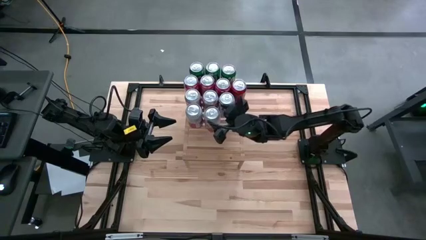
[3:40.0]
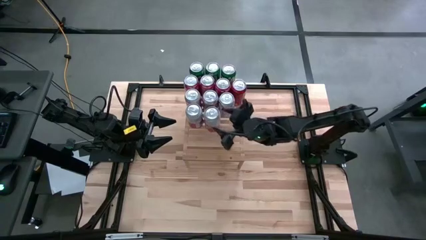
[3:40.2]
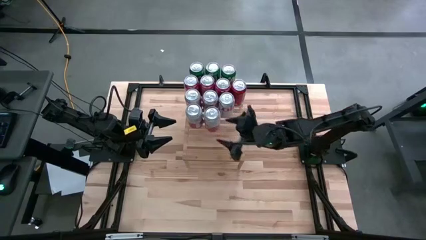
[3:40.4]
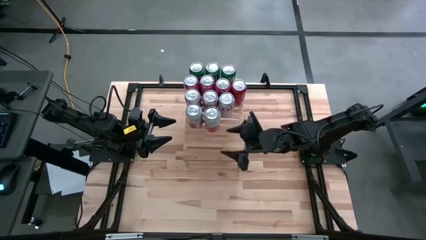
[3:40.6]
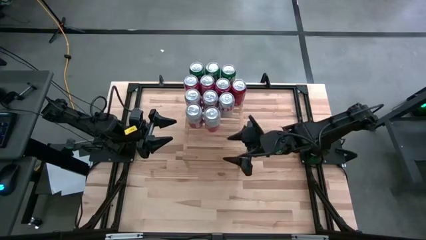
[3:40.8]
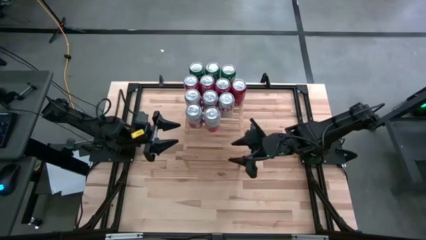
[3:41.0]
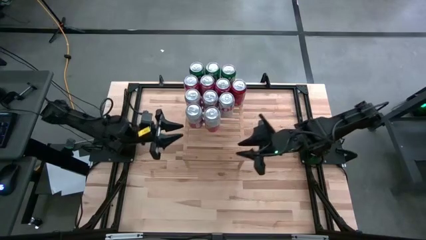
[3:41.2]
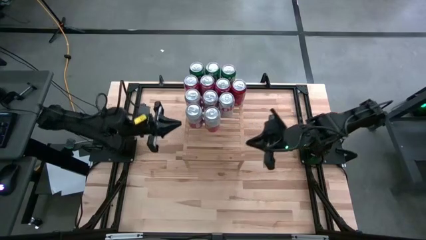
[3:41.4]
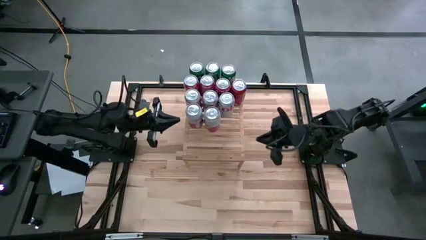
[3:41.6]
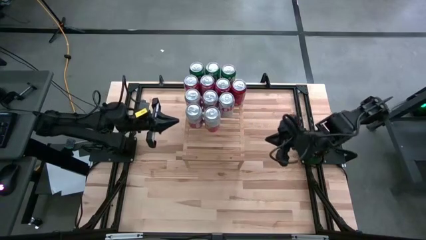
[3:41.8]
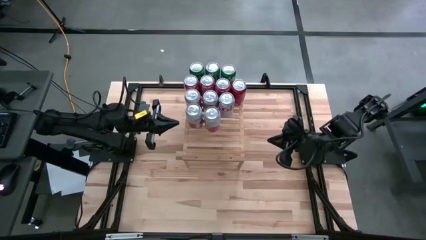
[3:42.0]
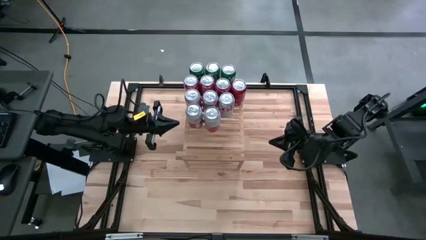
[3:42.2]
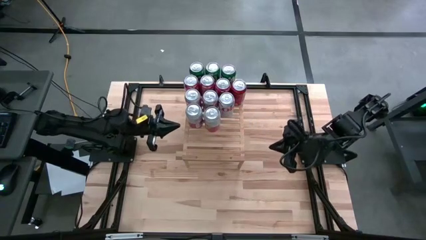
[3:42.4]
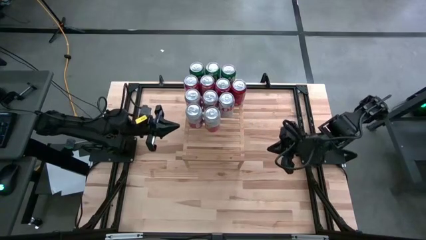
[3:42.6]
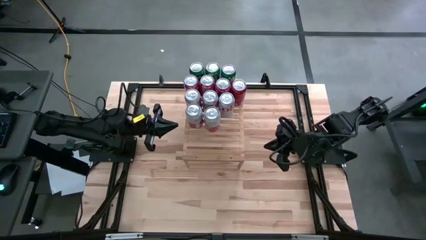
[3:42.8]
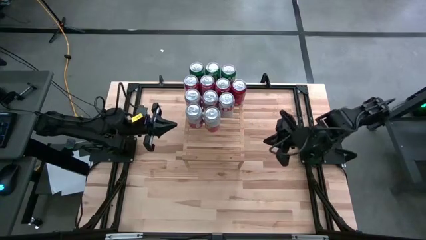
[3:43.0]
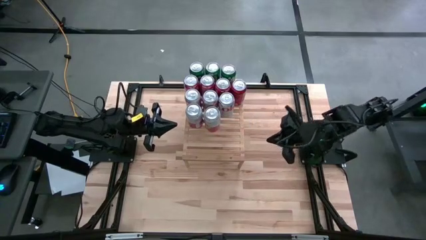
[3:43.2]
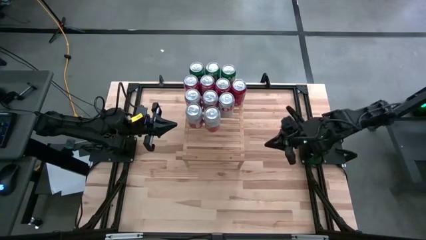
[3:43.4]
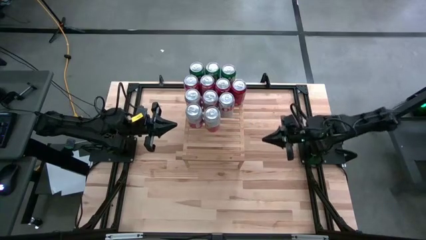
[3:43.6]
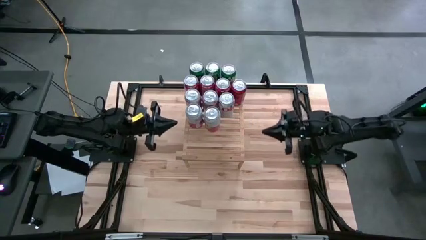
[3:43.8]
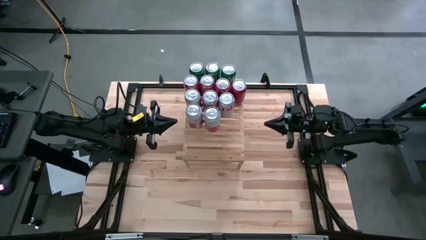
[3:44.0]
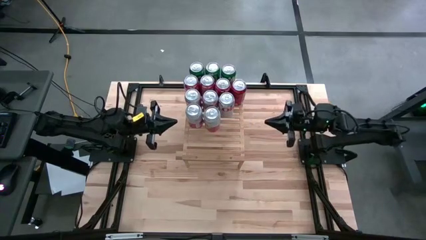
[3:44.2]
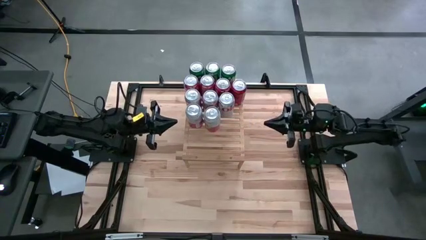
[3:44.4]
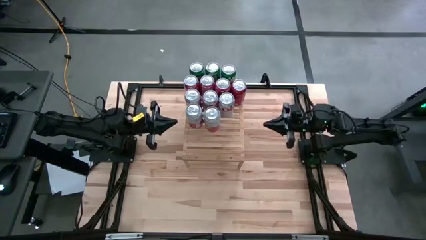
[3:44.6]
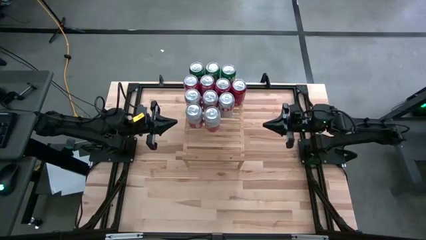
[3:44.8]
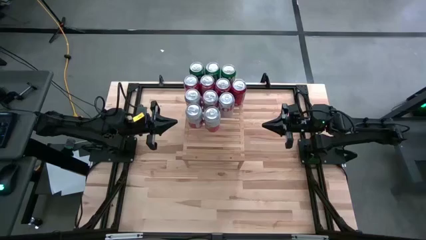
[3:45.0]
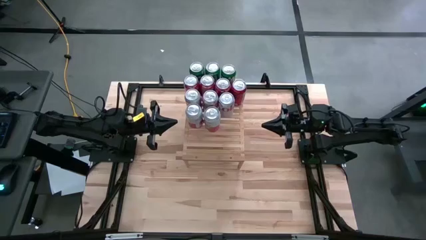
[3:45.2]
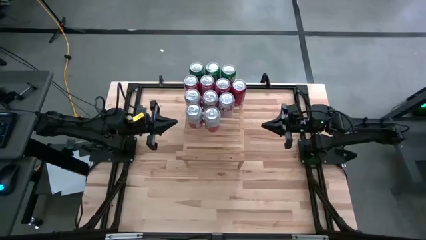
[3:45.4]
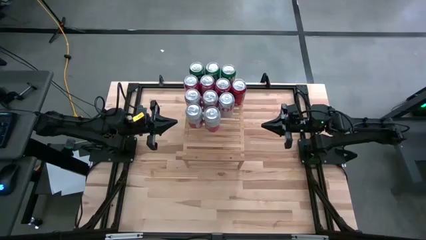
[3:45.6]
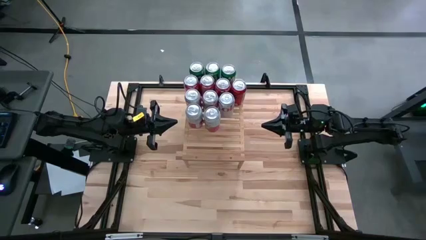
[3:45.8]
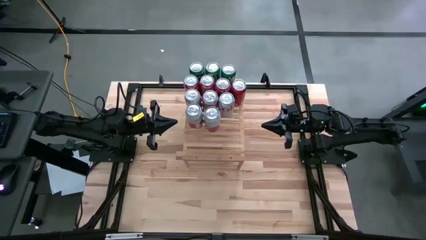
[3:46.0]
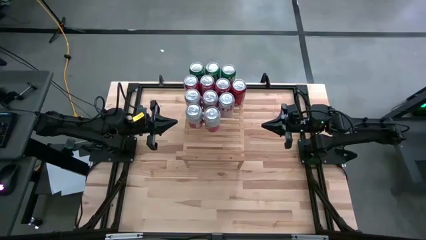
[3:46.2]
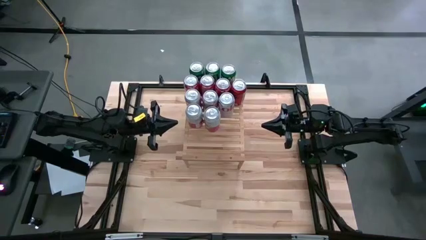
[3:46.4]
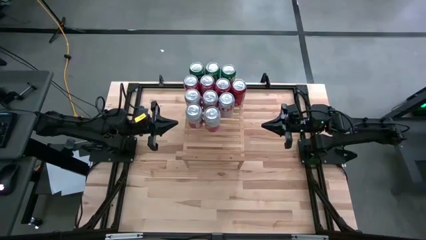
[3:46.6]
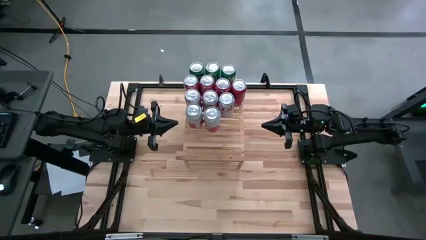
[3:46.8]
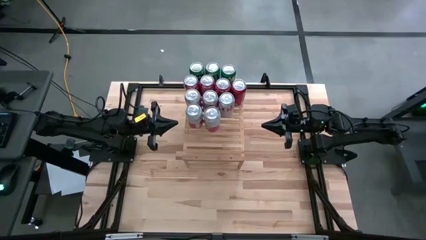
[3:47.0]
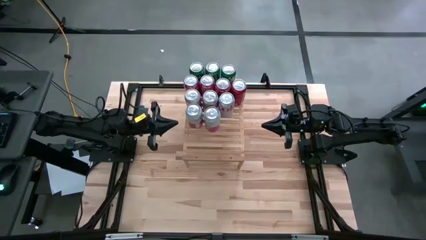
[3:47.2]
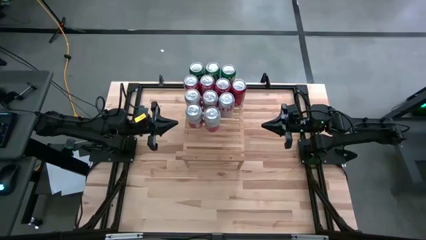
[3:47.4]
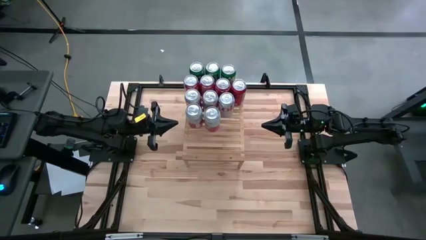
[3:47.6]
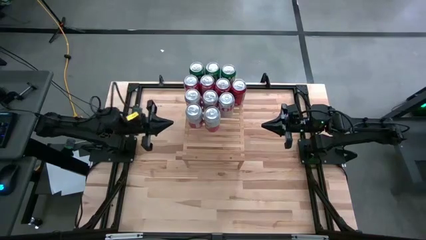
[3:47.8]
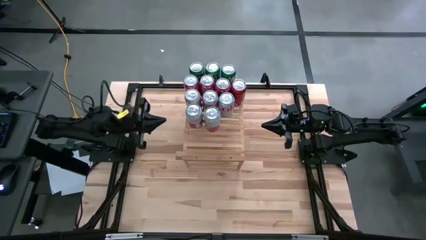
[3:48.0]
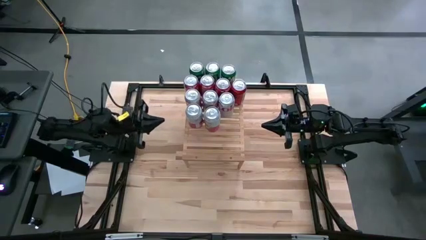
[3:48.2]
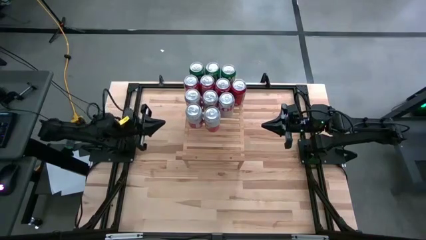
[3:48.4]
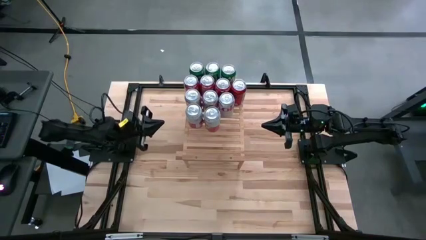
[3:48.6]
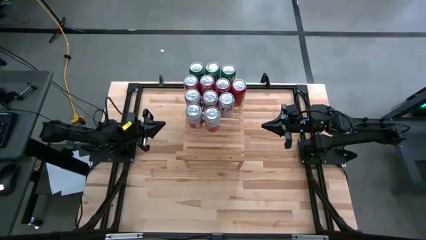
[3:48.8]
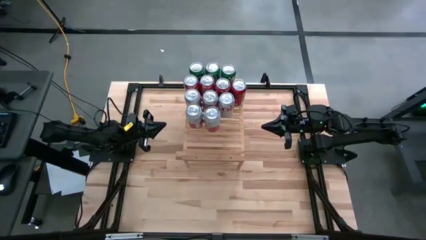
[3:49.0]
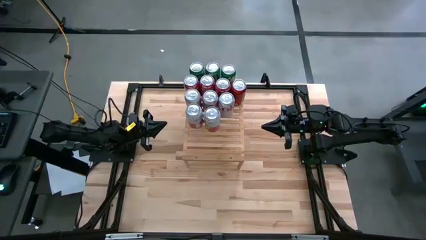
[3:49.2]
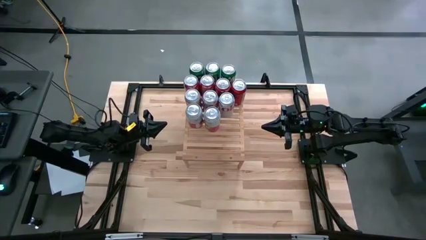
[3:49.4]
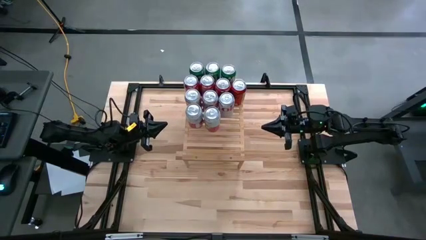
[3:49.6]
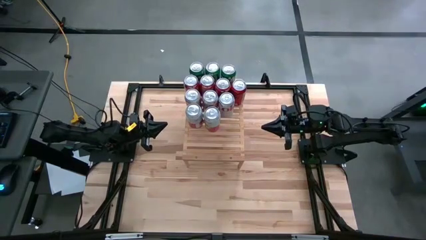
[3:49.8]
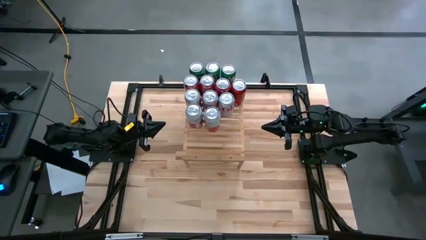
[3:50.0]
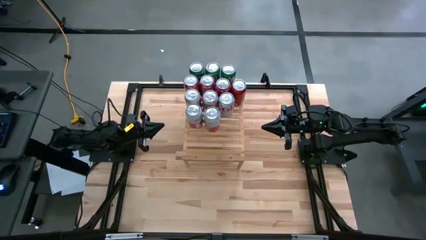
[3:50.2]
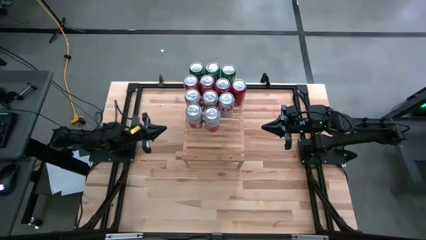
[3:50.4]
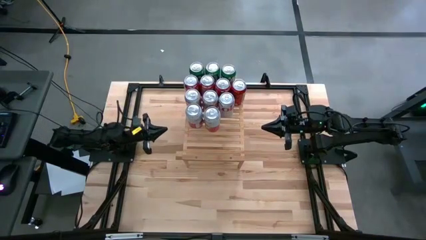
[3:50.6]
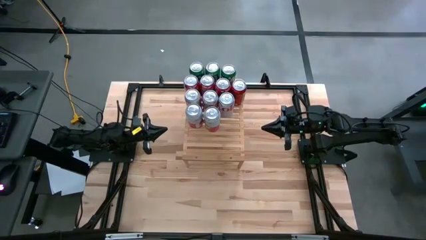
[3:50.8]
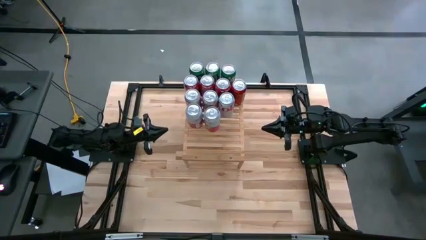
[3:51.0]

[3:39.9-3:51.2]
Task: Place canned beverage on shelf
Return to Home Position

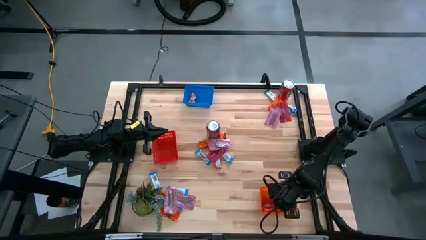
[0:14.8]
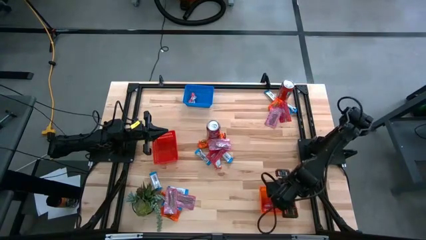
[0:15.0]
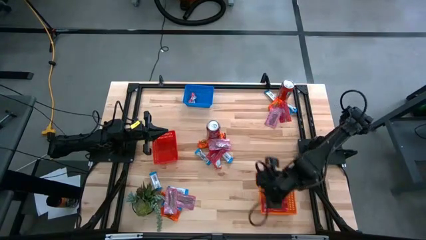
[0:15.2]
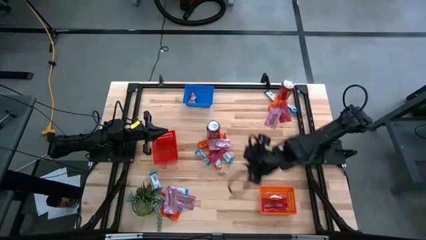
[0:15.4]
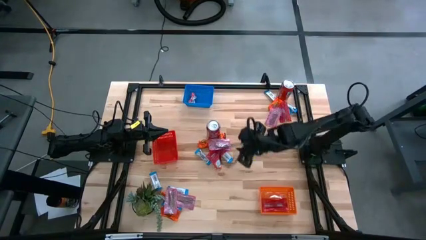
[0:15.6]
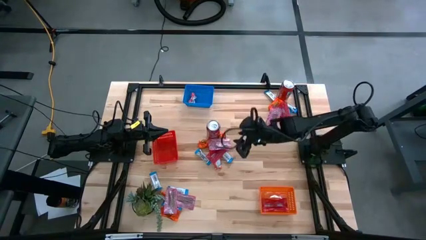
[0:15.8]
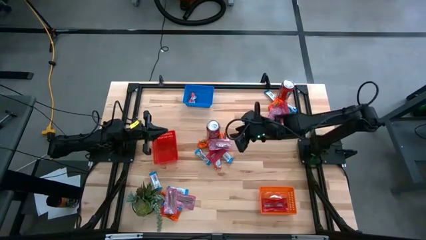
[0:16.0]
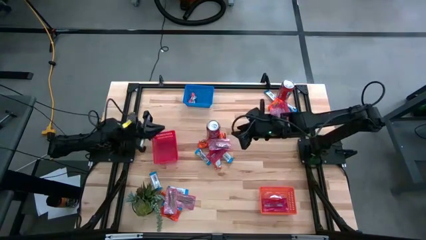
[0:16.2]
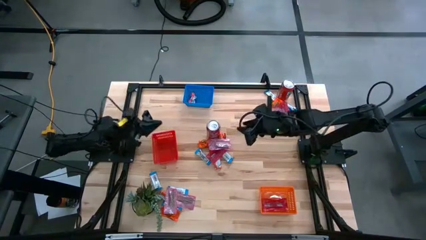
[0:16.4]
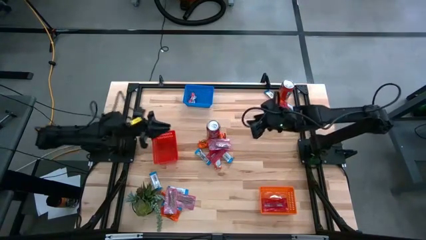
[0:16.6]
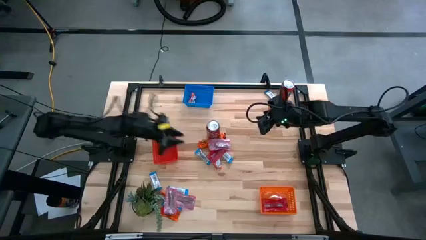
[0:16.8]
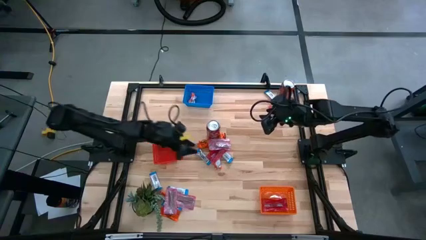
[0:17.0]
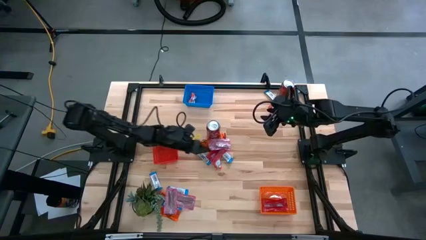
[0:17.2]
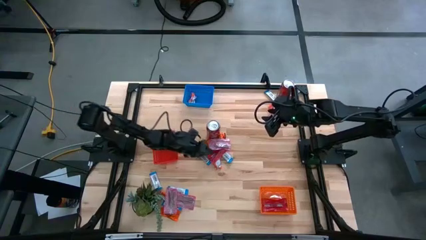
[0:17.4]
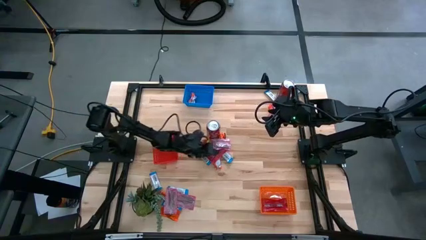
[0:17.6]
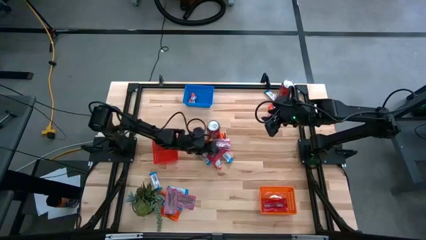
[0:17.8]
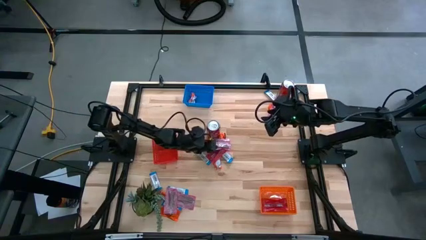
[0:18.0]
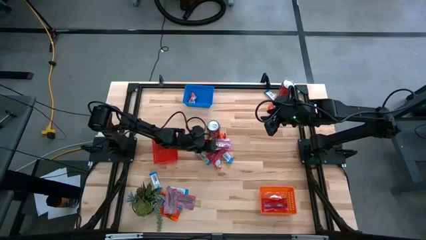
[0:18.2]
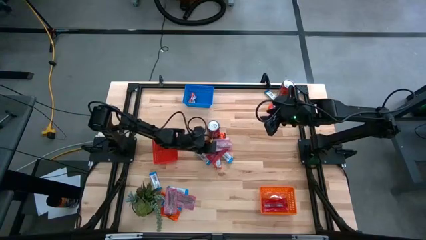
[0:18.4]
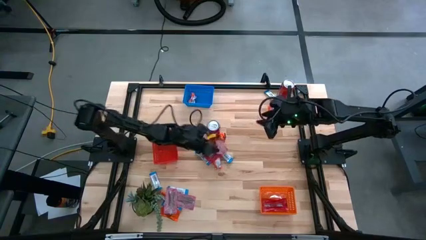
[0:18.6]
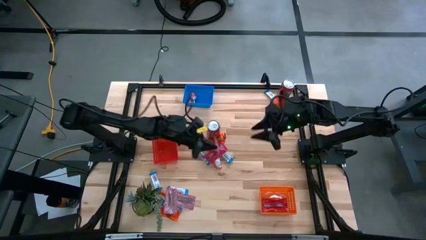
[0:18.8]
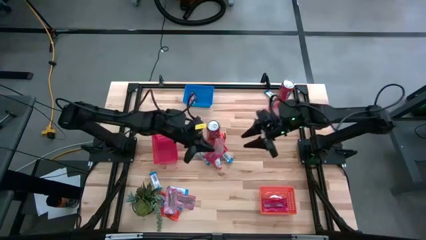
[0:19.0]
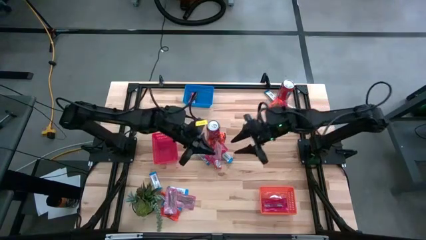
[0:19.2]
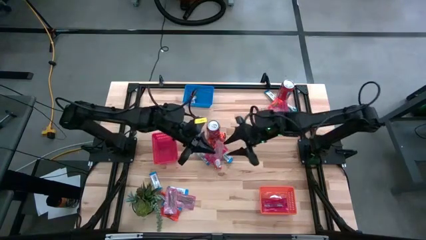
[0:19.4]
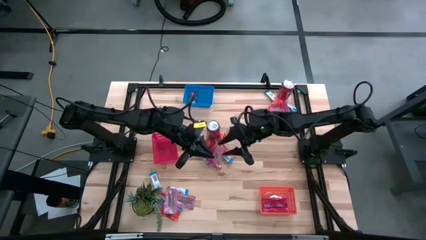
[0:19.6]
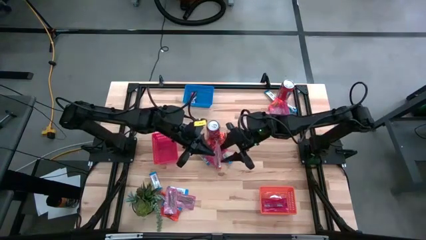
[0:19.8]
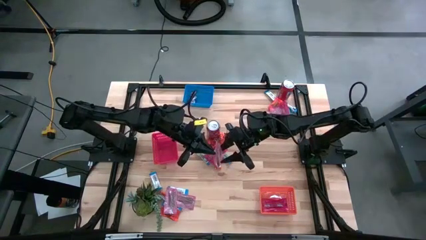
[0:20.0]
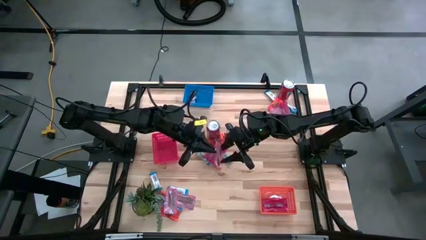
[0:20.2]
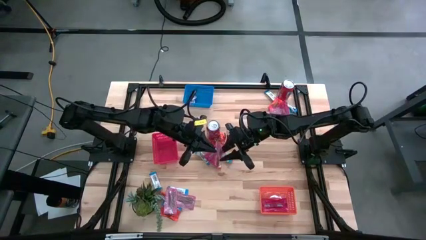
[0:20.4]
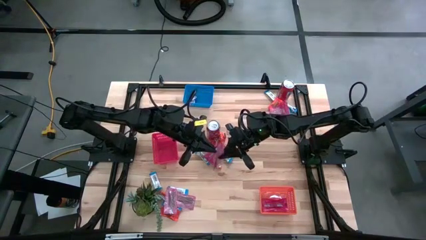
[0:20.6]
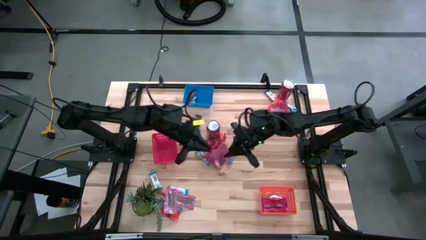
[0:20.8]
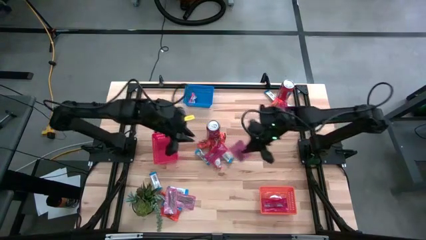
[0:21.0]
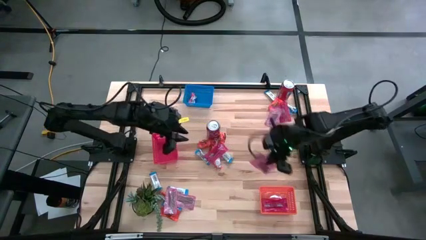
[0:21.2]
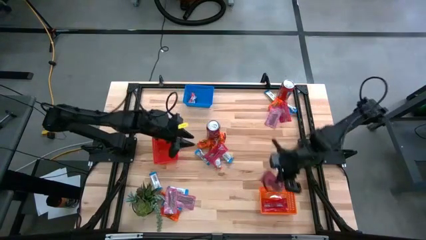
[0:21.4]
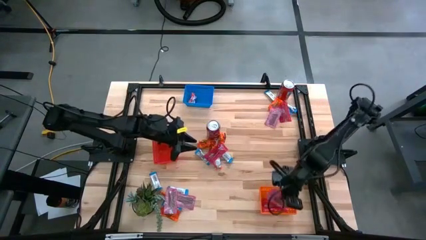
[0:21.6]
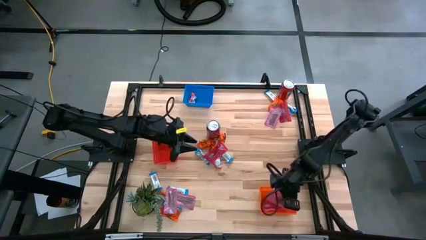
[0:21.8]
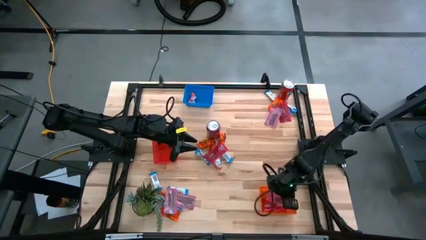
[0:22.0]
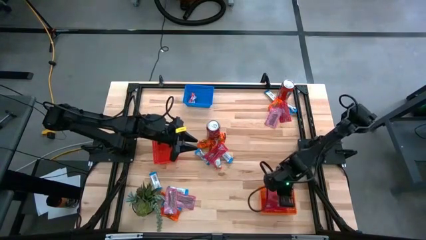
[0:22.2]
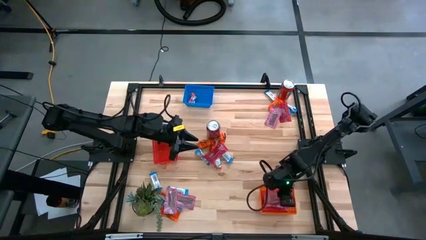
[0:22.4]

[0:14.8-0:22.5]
Task: Sort candy
Put the red candy into the orange bin
